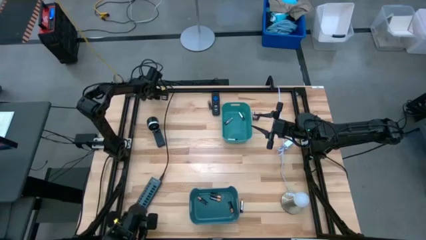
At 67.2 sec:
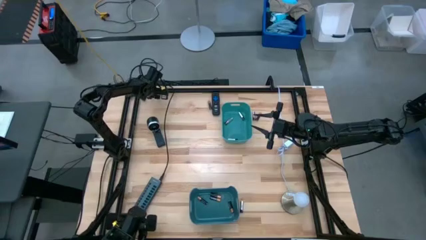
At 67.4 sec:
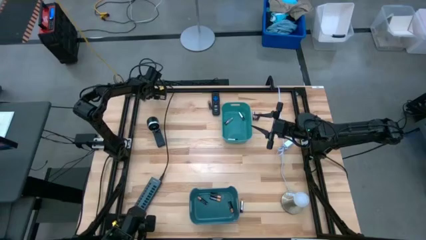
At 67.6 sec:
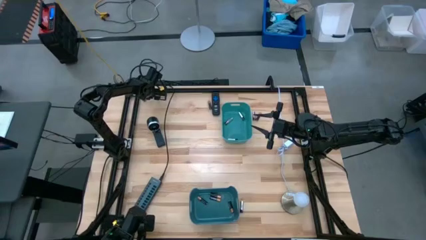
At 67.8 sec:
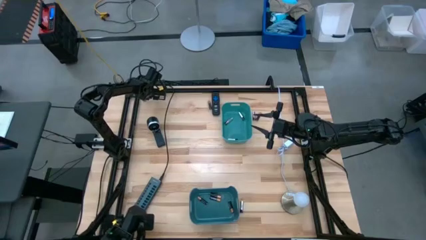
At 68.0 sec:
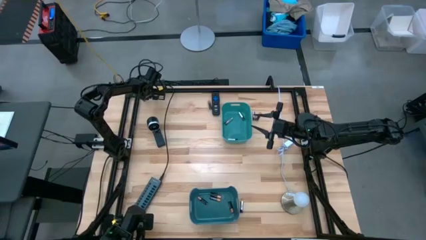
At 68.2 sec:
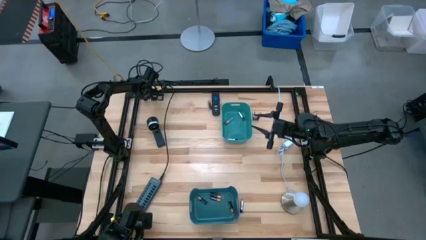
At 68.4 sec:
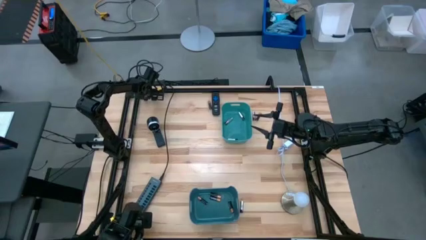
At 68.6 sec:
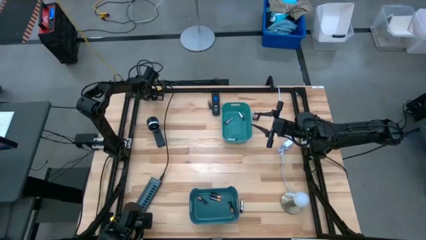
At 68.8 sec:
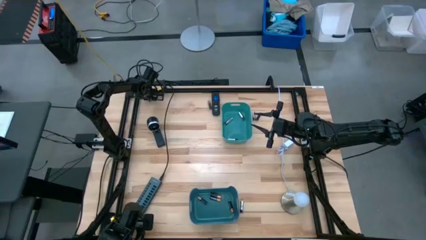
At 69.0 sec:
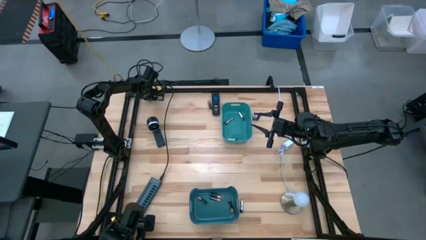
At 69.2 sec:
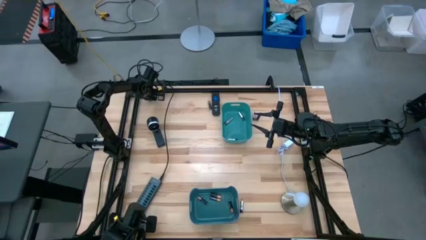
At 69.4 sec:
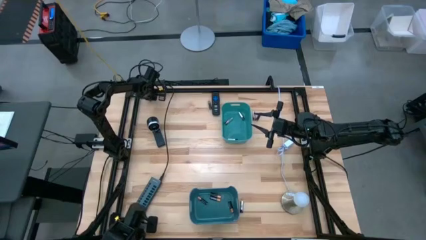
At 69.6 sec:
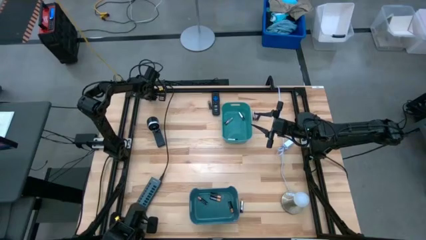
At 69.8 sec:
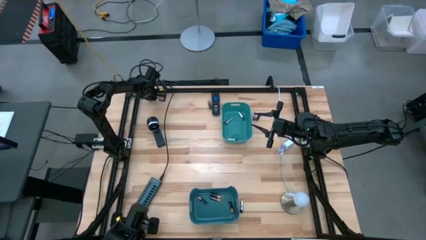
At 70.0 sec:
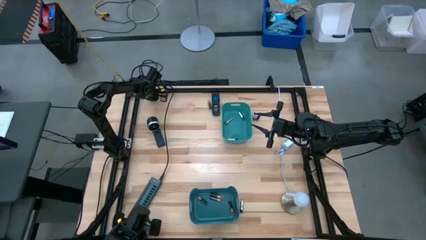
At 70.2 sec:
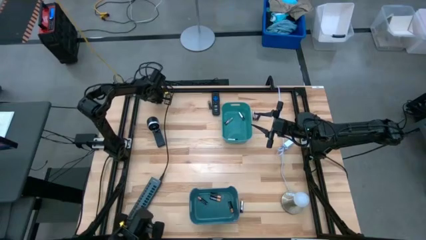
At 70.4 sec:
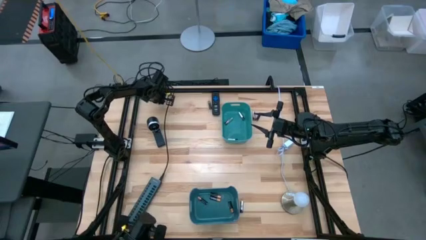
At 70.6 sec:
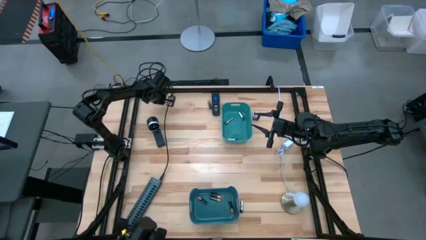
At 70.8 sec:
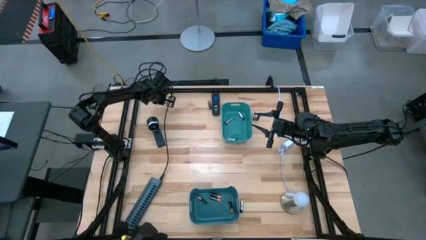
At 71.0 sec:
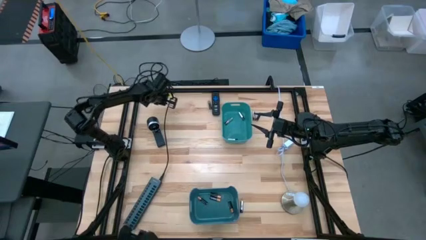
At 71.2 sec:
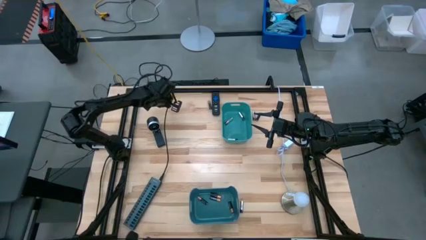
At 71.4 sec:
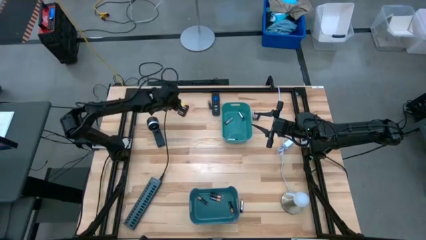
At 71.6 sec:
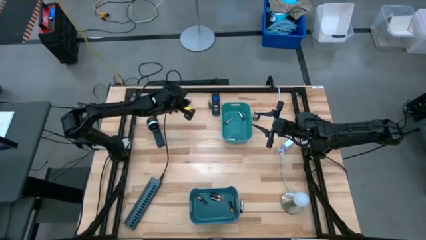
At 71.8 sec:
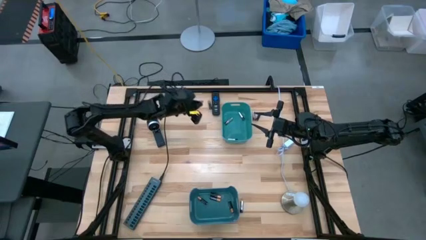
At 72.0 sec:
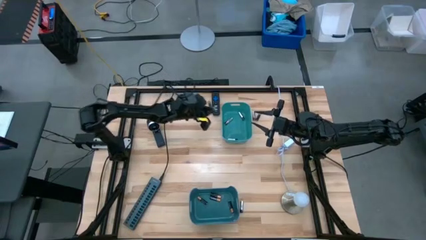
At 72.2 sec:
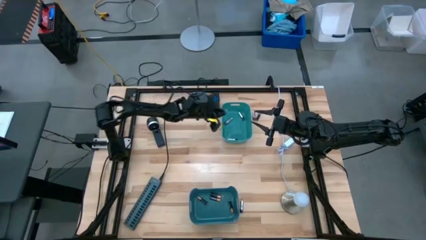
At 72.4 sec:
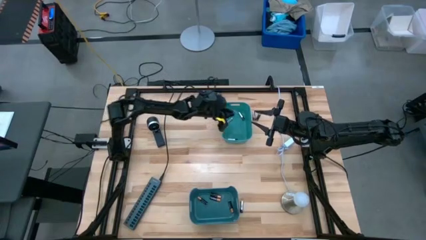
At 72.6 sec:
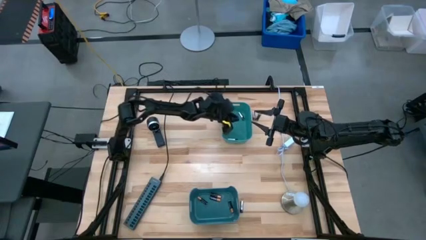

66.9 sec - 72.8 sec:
Task: Sort batteries
Put the silver battery into the light blue bin

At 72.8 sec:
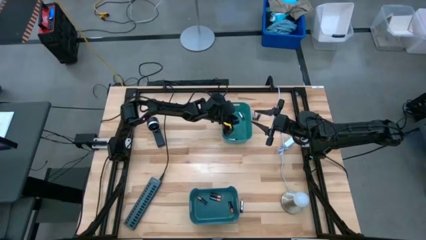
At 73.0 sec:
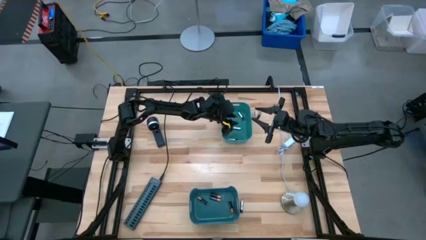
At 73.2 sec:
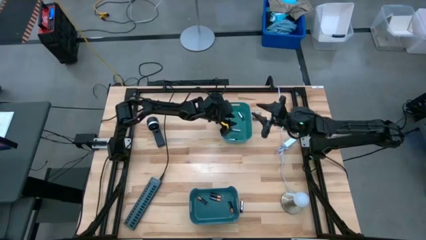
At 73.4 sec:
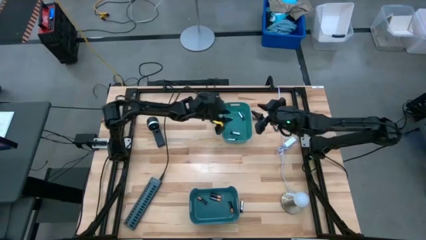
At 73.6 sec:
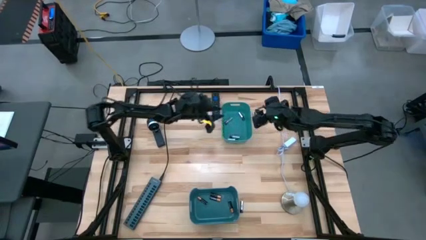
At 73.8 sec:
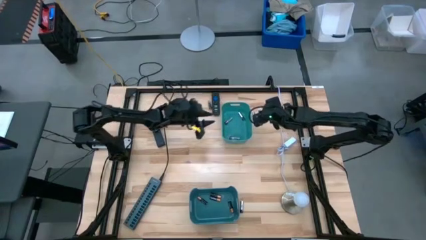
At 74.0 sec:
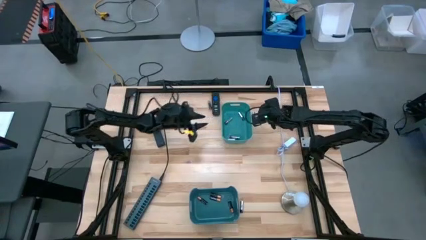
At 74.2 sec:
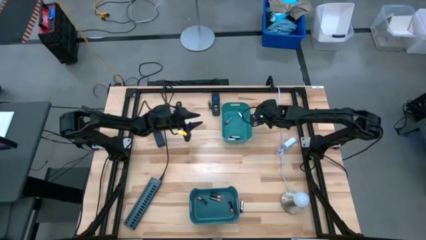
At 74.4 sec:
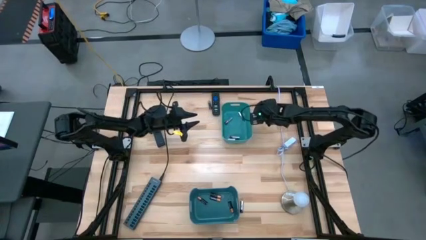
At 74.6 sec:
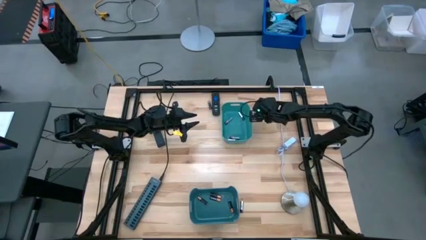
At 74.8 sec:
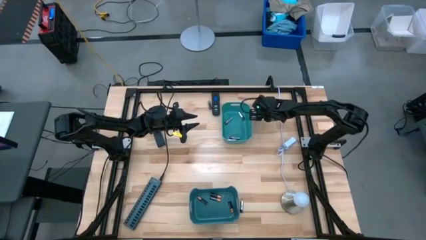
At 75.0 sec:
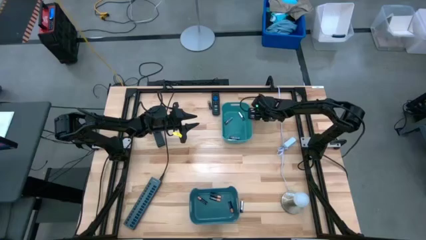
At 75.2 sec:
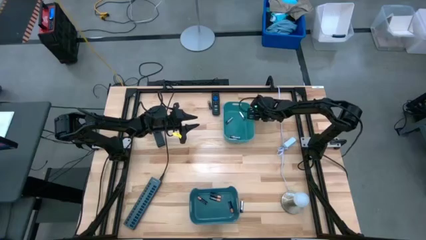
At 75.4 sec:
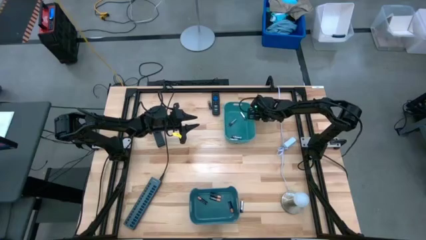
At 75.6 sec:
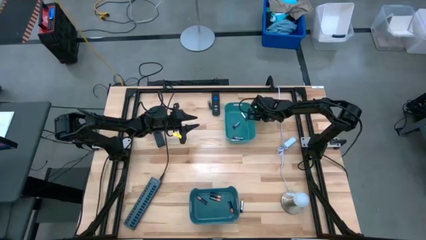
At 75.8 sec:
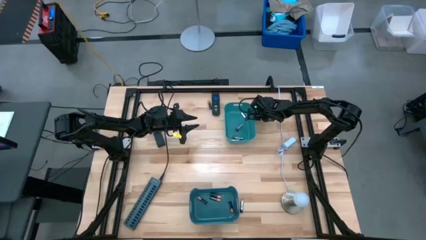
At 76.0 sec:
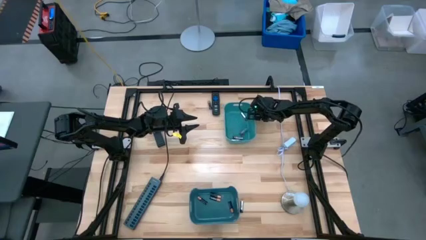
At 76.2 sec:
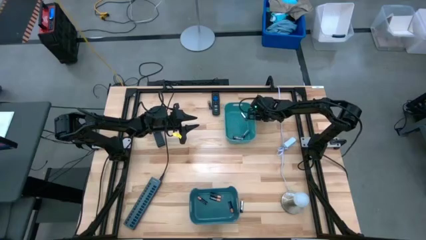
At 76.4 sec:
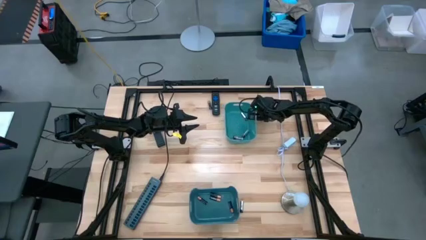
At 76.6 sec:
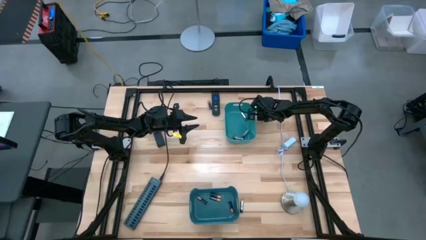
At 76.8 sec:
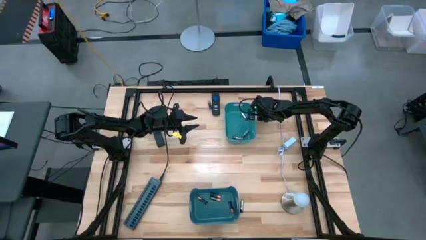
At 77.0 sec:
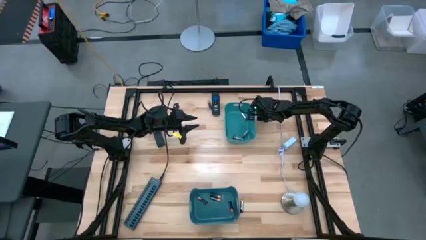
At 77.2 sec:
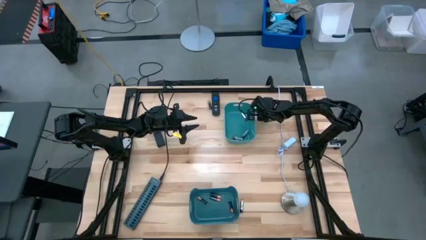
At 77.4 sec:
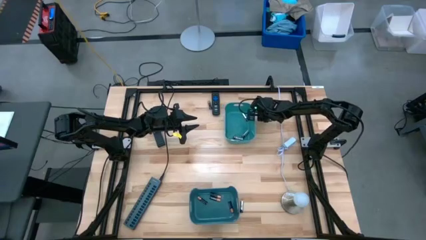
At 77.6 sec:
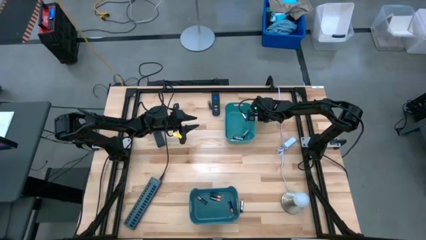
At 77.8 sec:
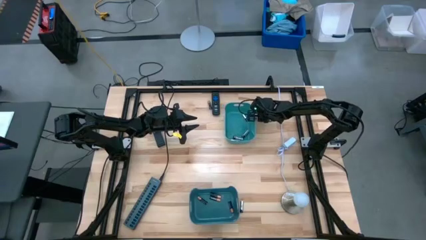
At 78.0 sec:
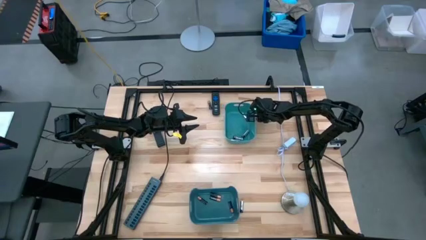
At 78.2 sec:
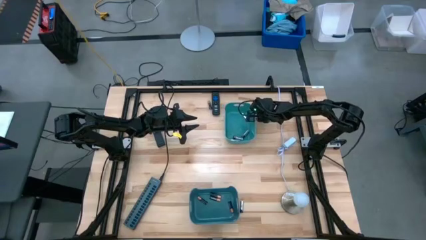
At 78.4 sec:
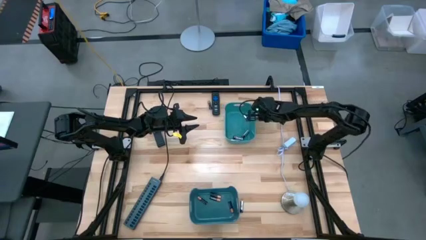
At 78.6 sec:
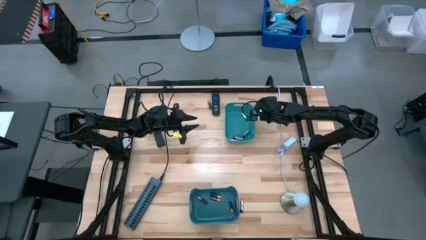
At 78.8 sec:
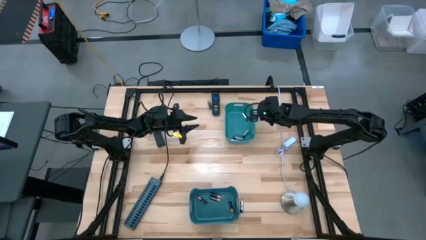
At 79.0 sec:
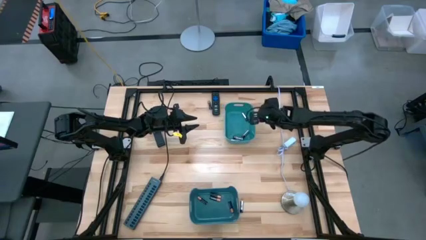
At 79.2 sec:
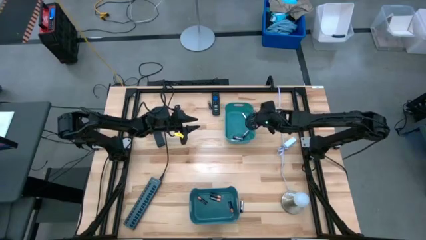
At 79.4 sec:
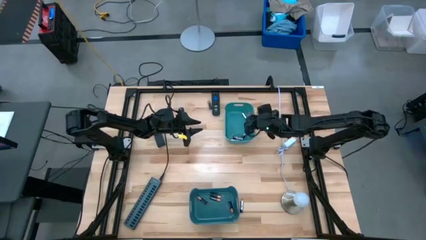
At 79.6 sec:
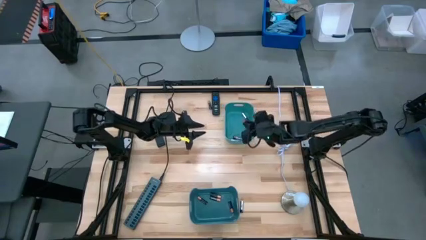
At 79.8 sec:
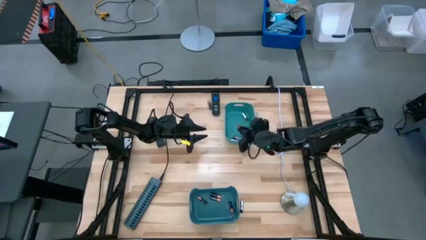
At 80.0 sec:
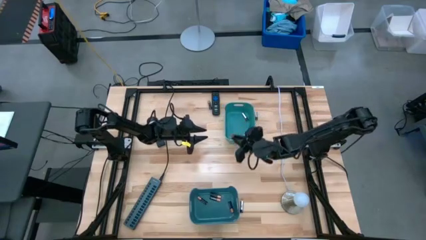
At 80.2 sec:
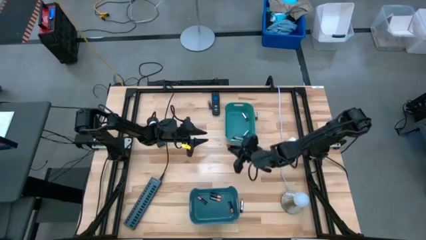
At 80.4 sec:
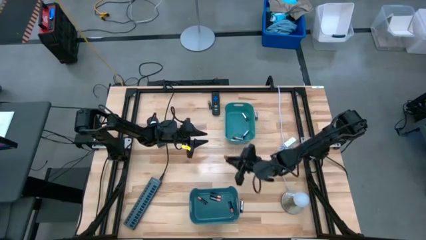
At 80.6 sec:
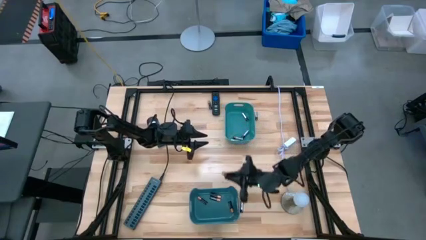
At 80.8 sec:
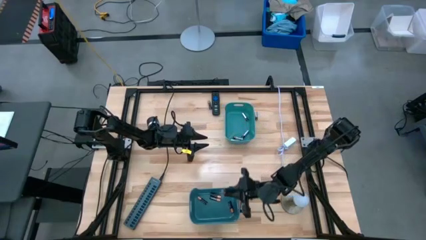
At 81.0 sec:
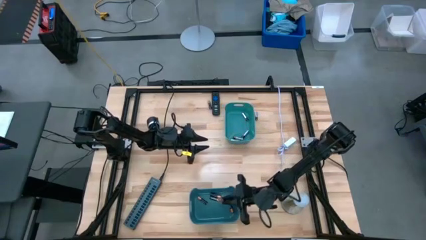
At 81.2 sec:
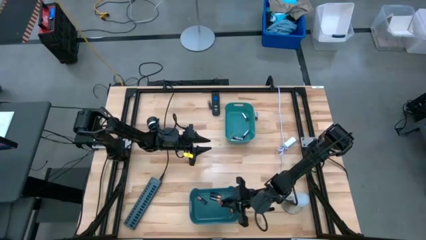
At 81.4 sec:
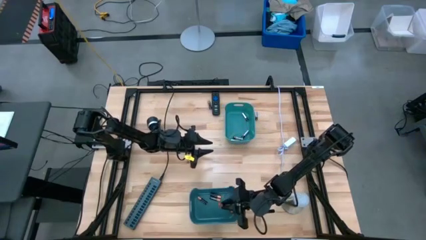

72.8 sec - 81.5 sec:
Put the black battery into the blue bin

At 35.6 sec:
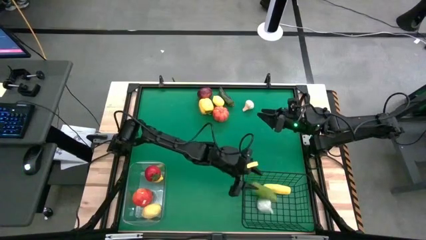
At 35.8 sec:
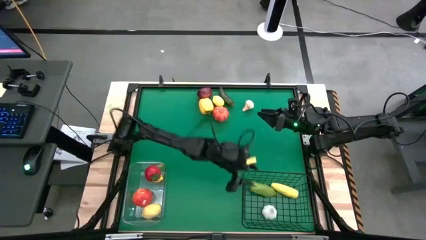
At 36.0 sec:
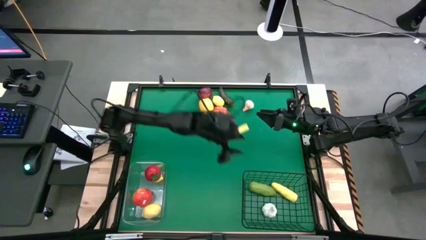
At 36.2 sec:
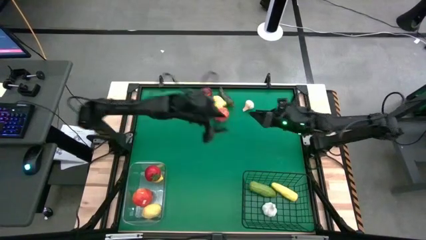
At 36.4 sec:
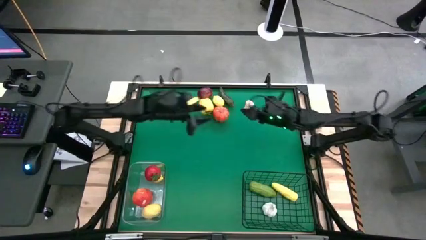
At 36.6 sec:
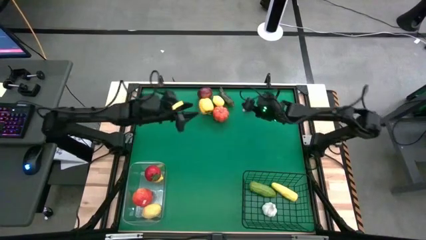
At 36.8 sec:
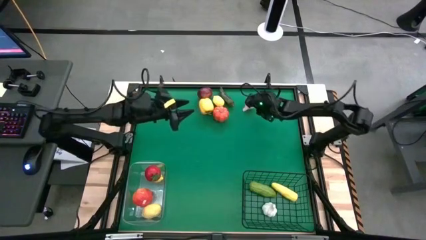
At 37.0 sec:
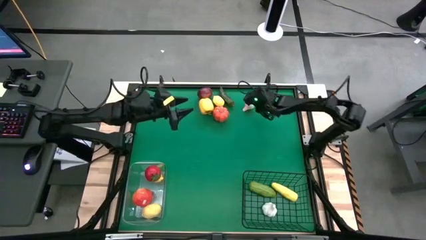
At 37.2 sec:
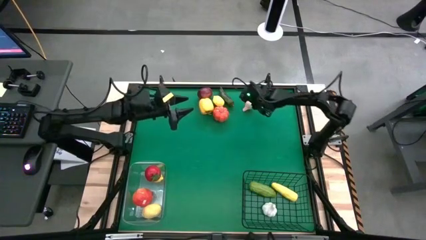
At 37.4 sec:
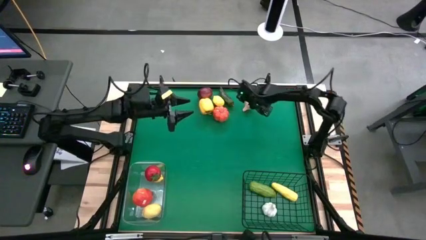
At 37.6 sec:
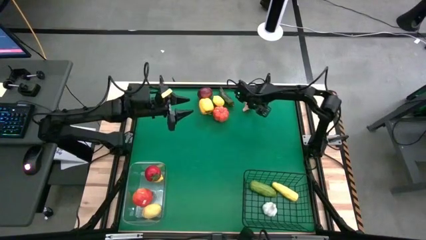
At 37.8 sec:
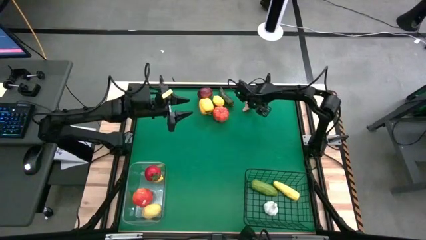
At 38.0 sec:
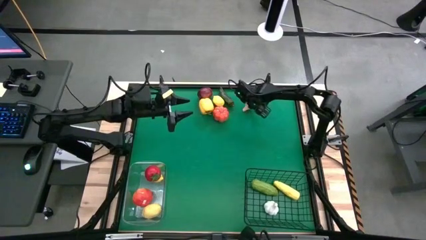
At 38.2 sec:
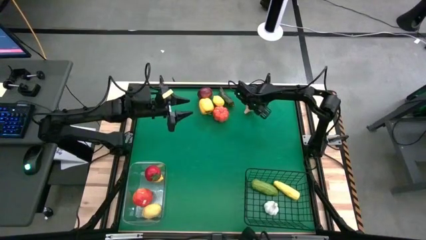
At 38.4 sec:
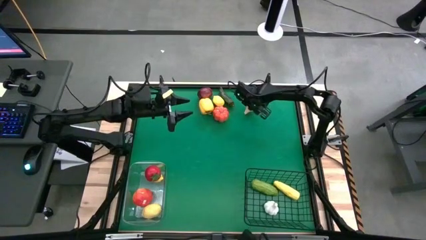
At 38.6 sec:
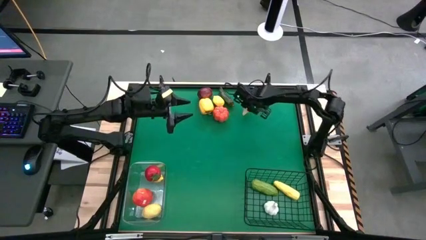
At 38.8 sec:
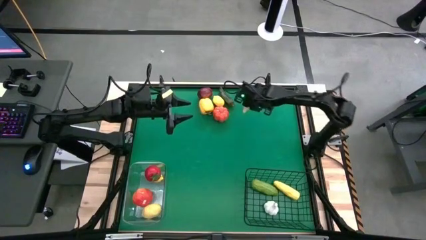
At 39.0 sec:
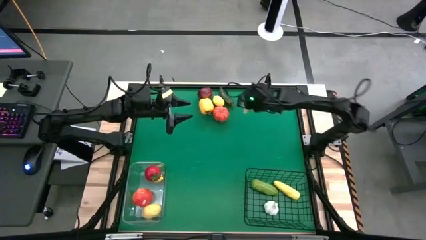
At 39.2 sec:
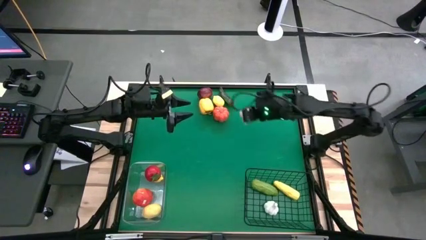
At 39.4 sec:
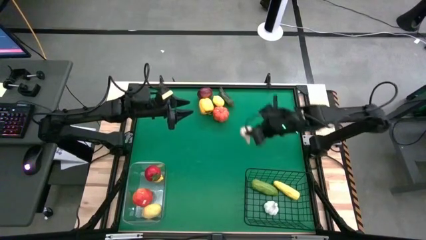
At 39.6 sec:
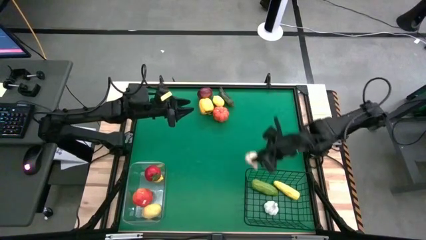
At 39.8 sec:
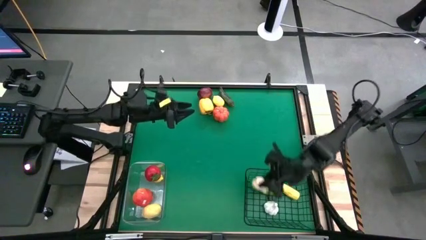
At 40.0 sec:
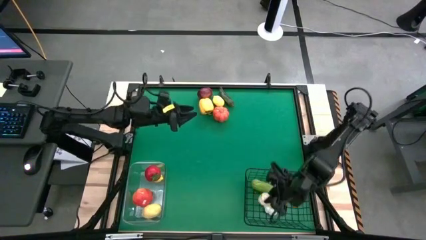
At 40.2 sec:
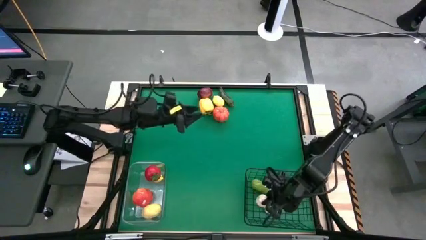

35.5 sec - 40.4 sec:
Task: Sort produce into baskets
Put the garlic into the wire basket
